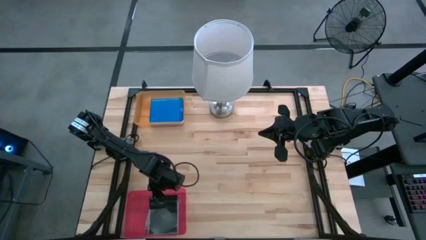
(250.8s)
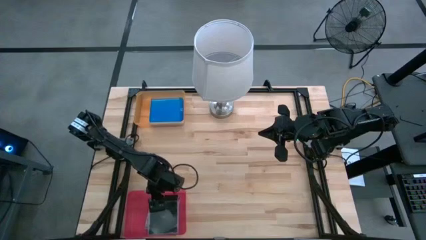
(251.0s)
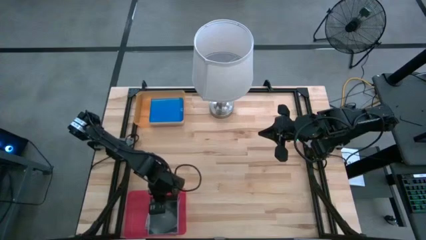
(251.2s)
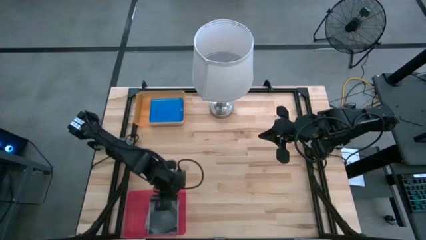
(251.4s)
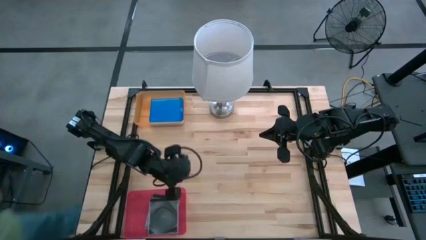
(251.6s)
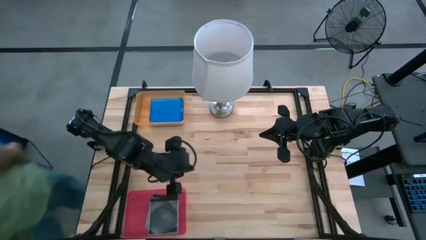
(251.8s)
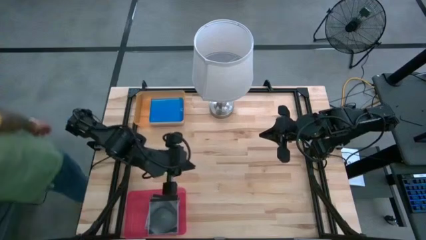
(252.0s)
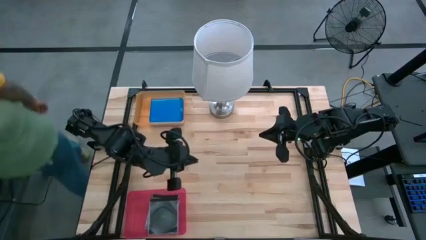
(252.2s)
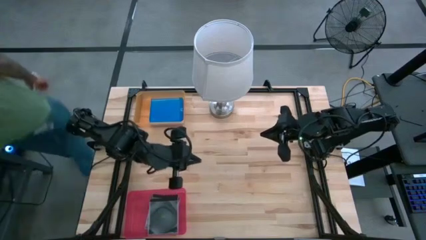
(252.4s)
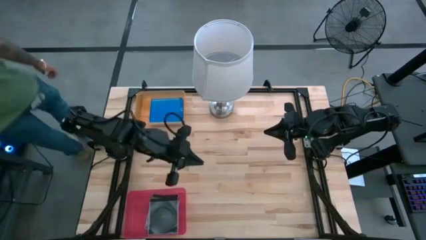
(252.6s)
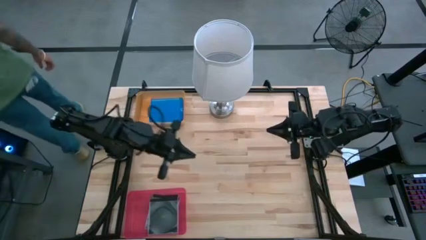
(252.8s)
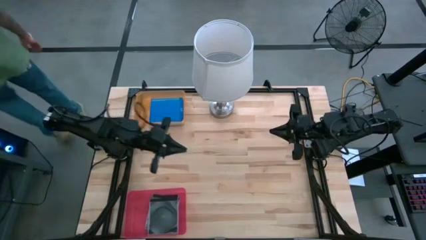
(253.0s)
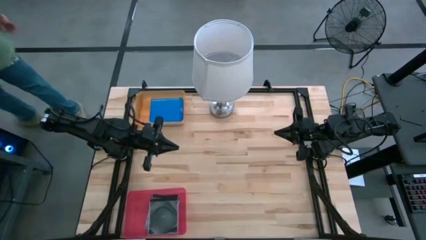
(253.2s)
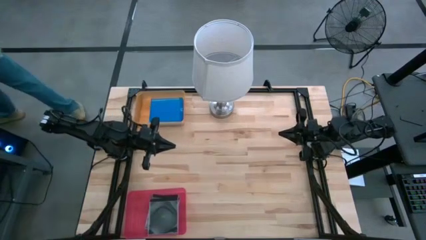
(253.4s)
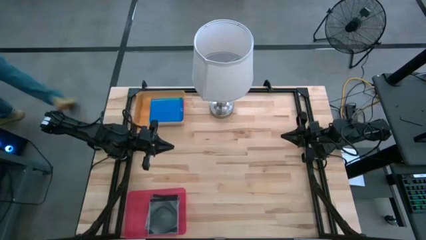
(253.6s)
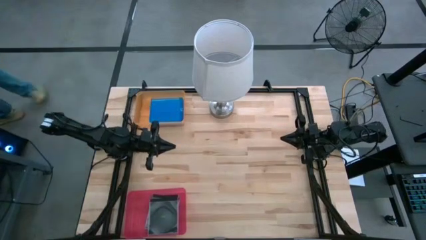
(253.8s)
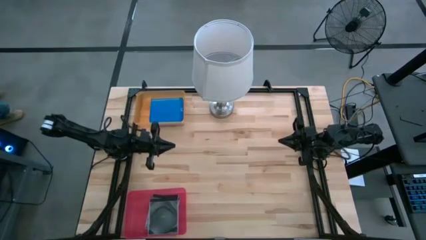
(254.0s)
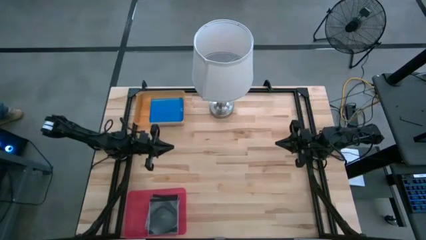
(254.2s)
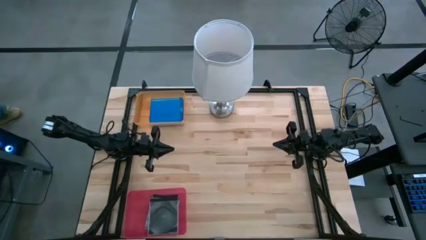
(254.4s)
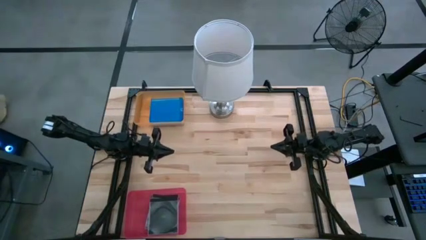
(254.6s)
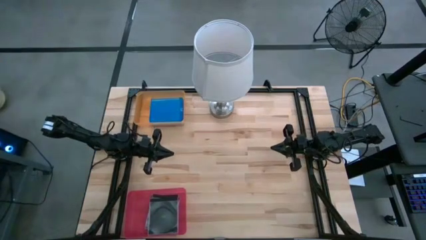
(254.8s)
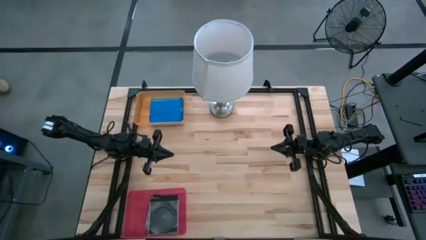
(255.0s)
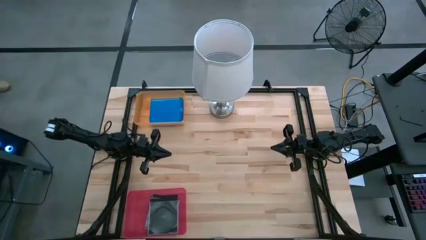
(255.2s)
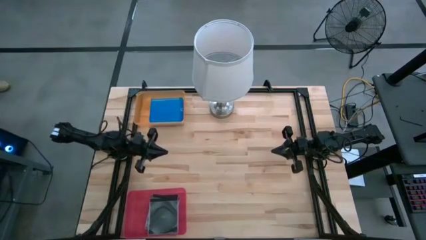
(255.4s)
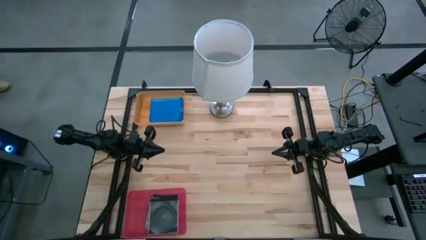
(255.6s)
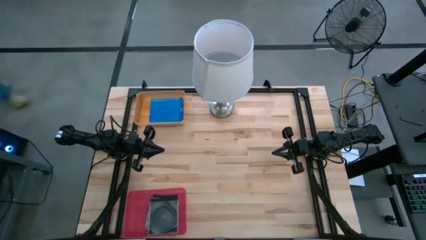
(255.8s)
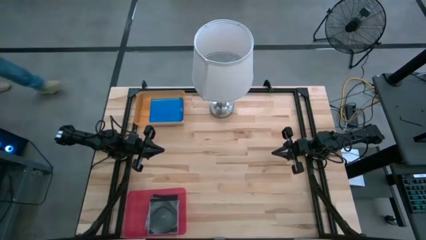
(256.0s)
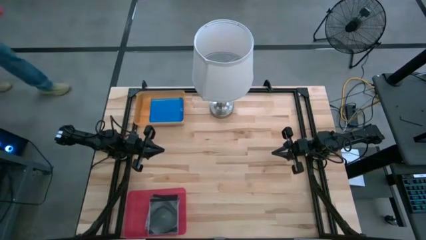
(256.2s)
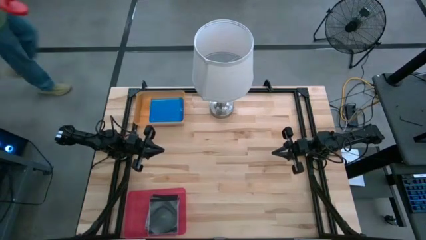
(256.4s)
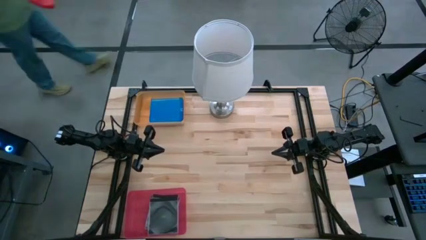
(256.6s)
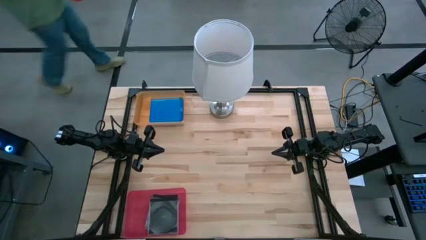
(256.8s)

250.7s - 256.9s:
Task: Pick & place jewel cases by type
Return to Home Position

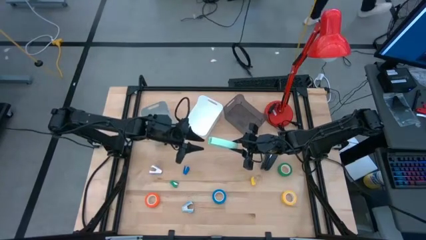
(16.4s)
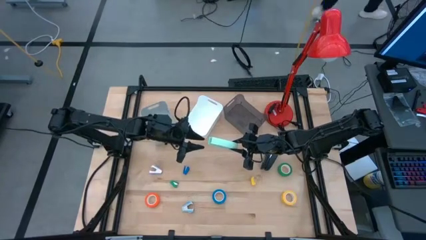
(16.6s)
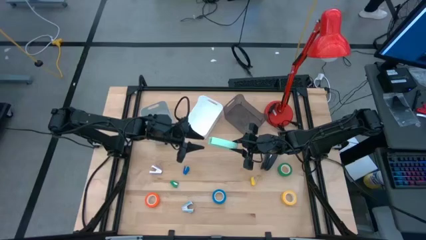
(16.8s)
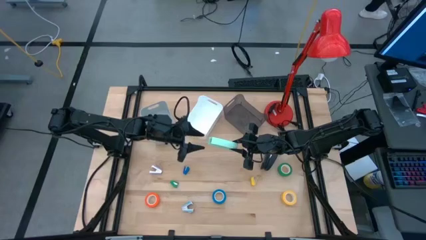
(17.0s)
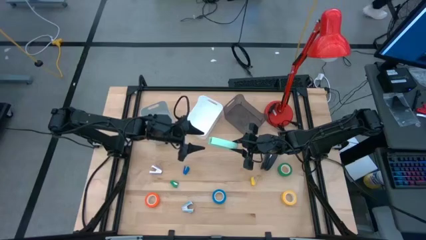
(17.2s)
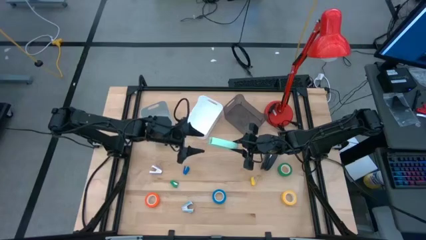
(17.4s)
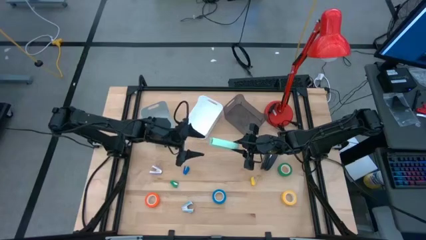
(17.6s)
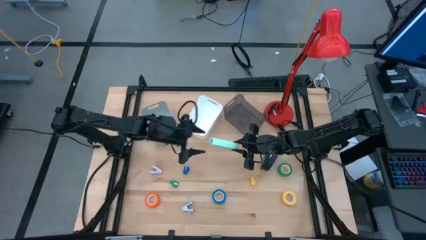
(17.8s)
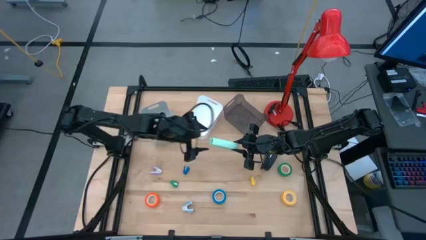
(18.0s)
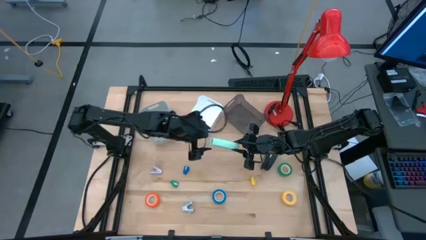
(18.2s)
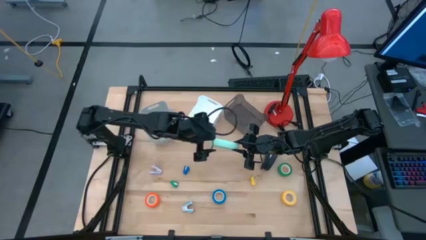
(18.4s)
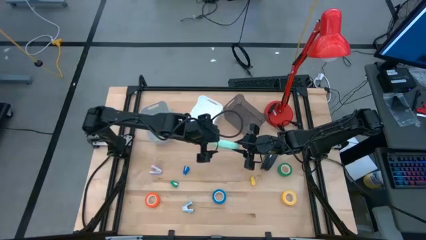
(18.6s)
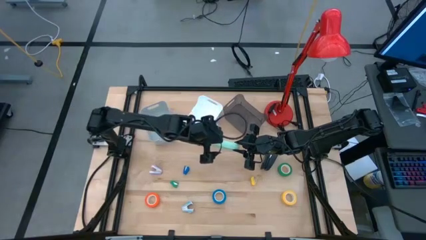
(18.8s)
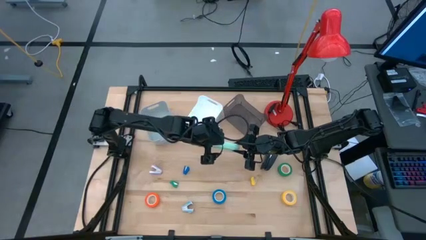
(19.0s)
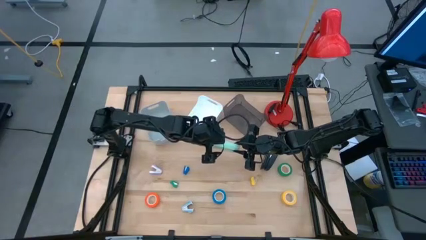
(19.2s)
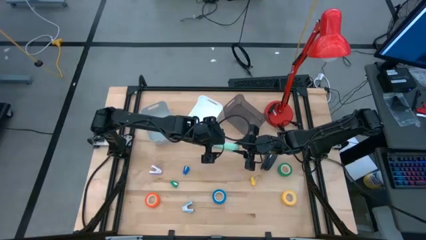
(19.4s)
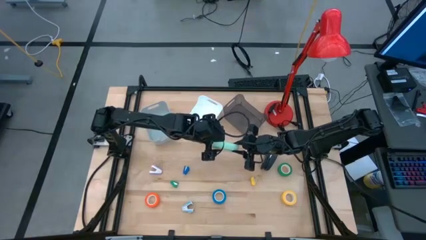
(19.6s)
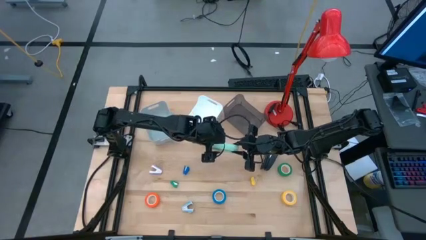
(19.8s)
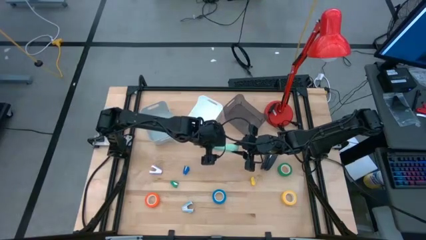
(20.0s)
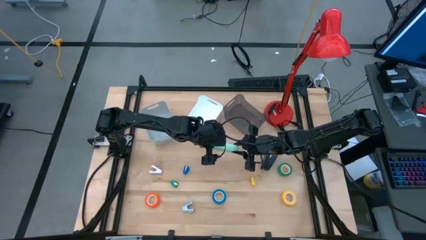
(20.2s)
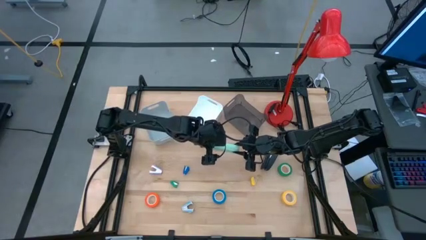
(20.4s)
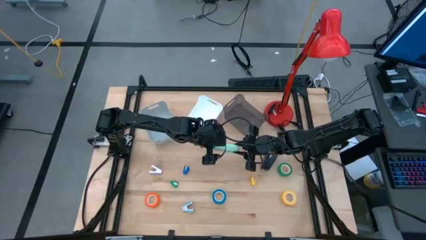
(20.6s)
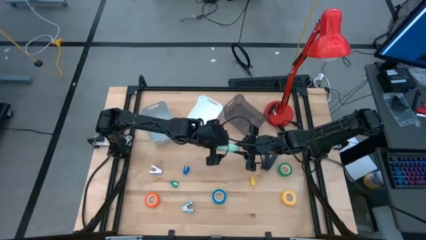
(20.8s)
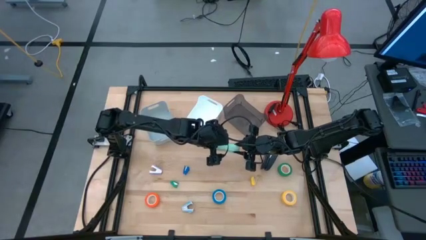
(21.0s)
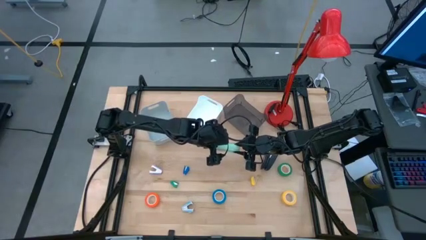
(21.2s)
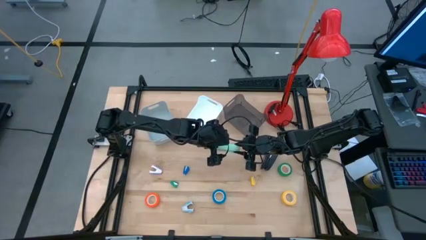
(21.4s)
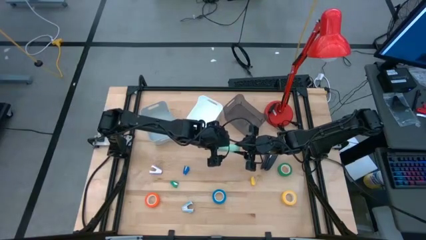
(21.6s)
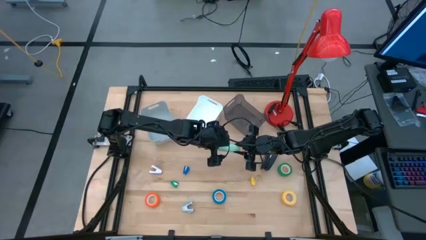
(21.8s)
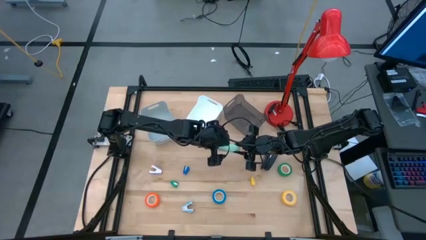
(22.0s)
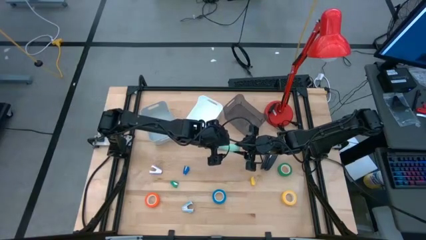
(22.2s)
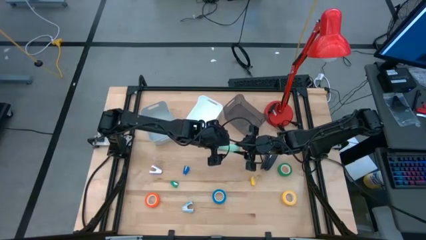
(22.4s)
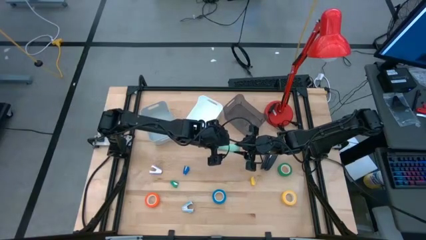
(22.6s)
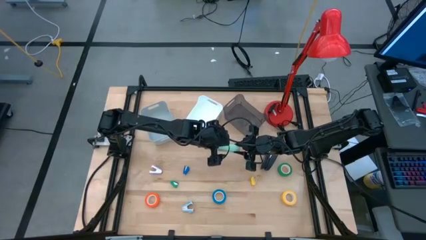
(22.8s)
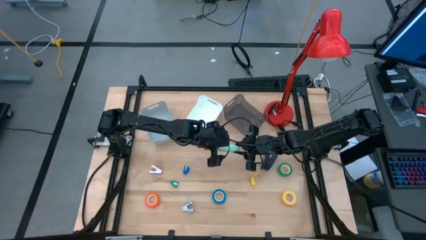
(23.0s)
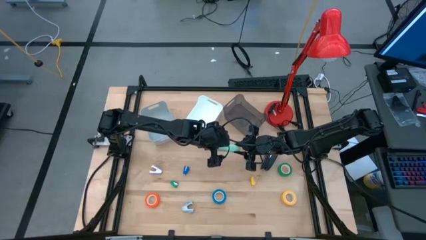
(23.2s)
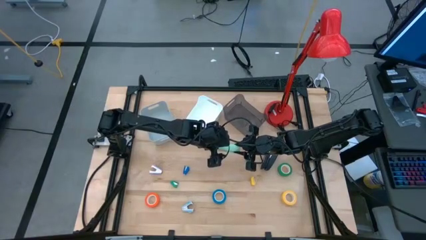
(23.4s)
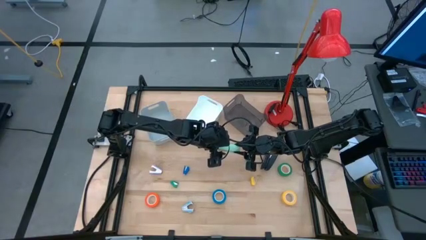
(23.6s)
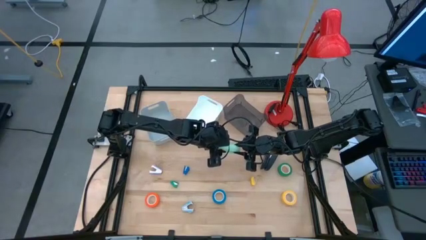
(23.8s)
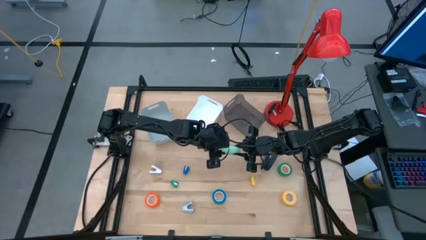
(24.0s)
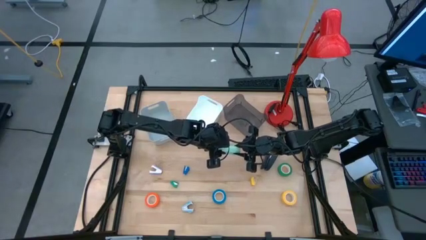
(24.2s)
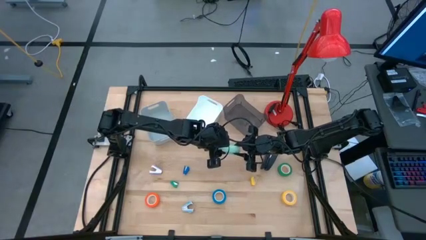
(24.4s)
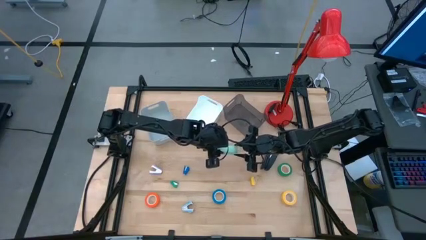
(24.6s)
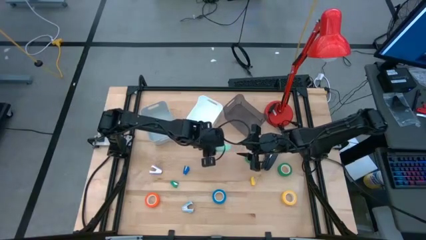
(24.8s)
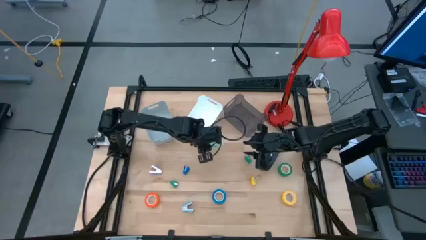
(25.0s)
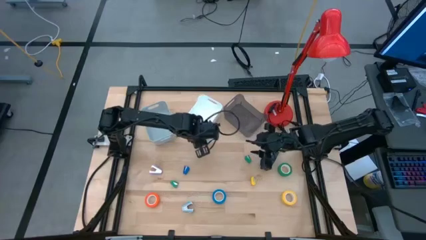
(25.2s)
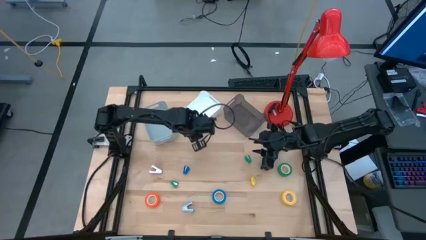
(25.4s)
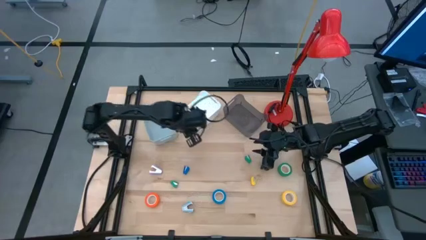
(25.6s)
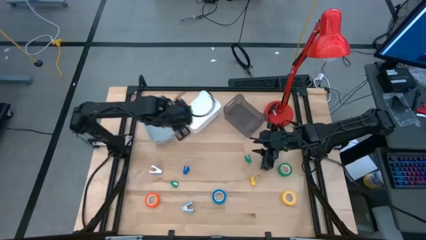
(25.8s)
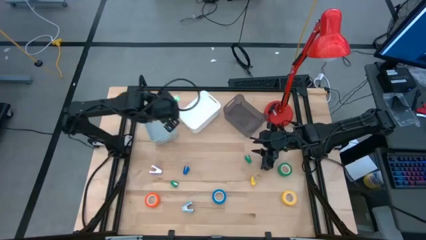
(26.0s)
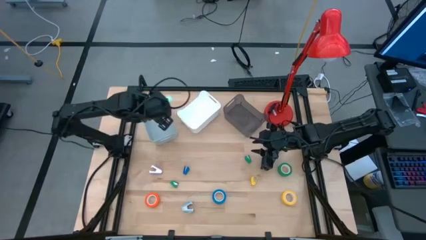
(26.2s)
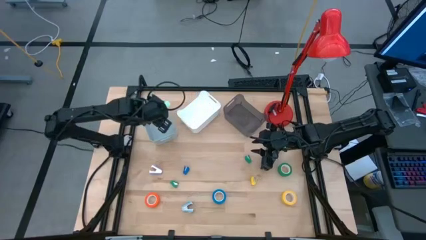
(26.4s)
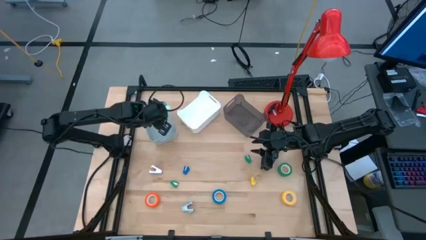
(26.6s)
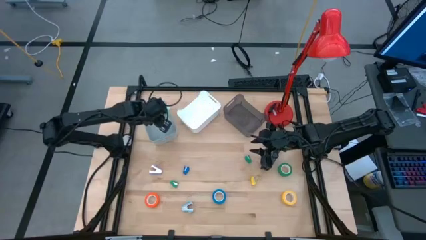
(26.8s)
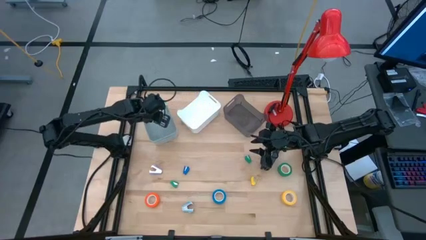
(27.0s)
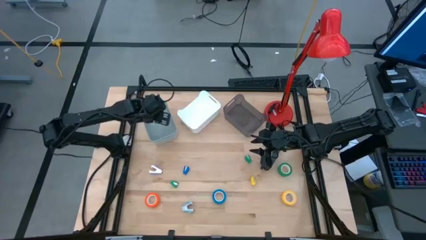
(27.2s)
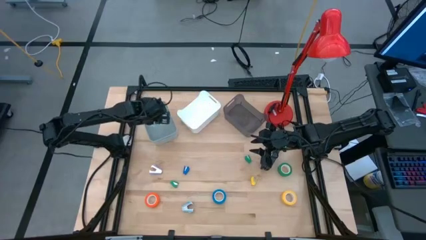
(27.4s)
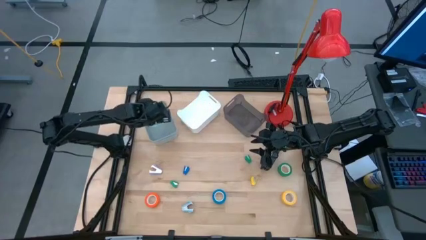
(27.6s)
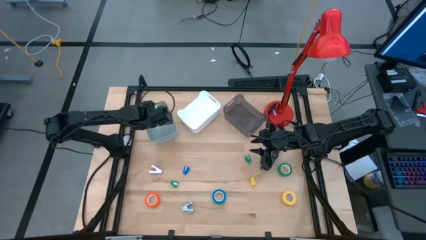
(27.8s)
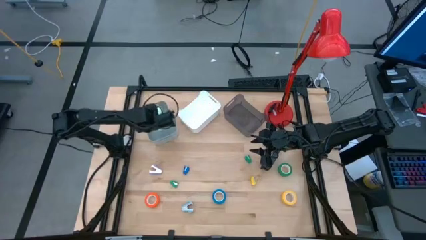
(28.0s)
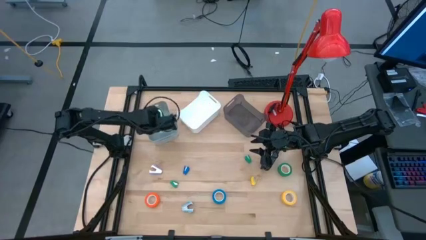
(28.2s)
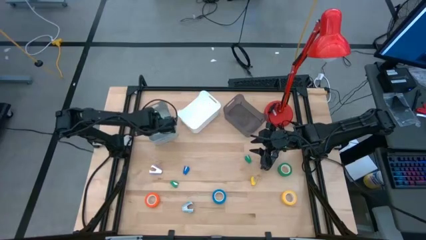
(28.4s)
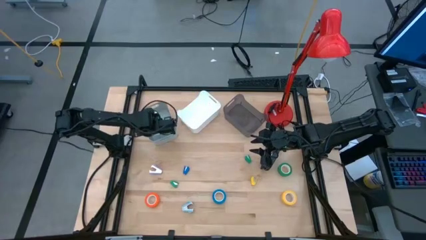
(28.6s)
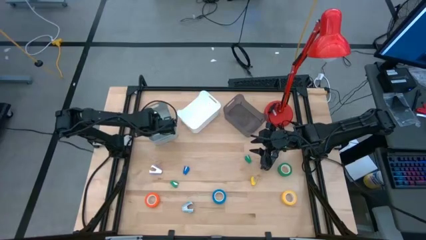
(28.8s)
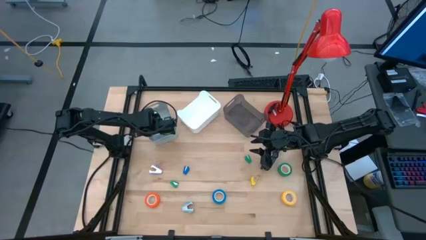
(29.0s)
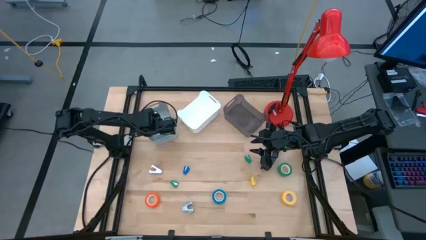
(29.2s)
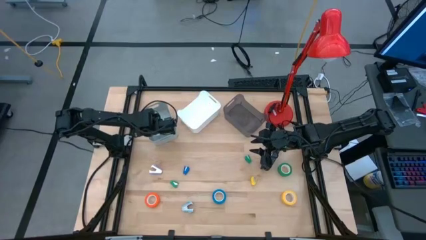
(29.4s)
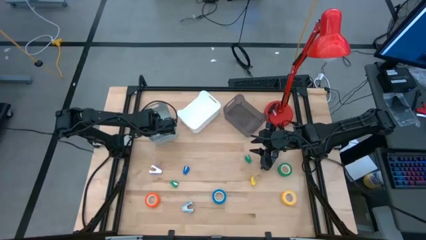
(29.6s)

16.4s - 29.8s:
Task: Pick and place Stapler, Stapler remover, tape
Put the large light green stapler into the gray bin
